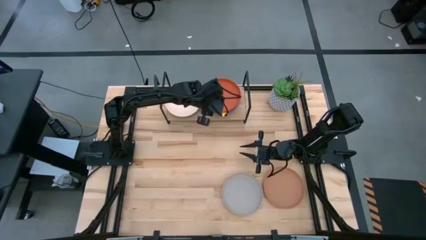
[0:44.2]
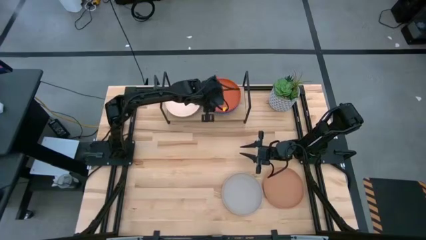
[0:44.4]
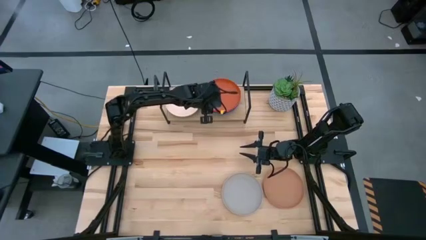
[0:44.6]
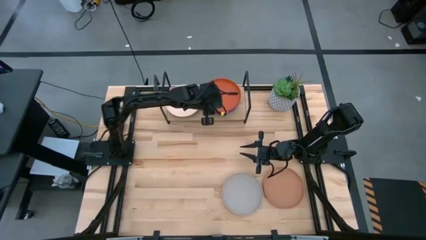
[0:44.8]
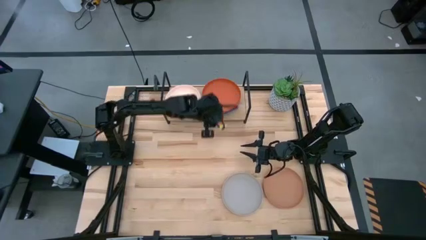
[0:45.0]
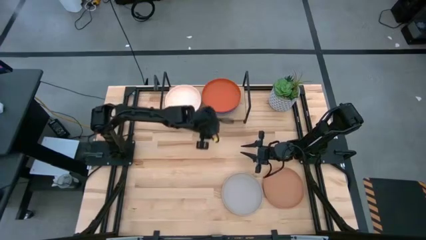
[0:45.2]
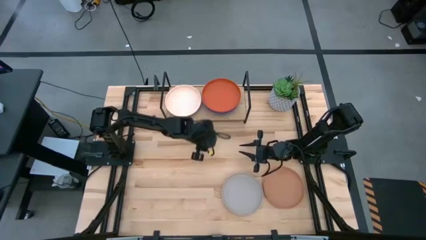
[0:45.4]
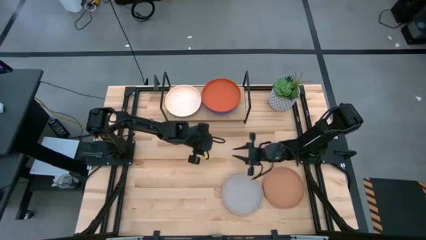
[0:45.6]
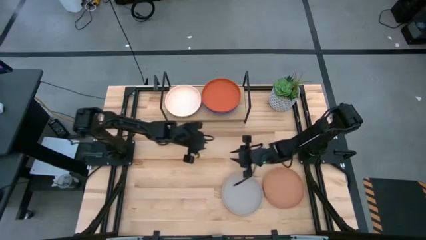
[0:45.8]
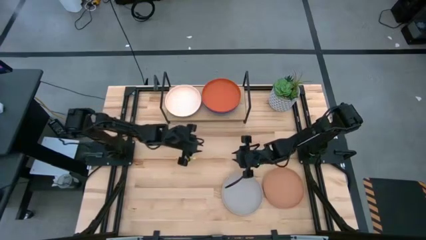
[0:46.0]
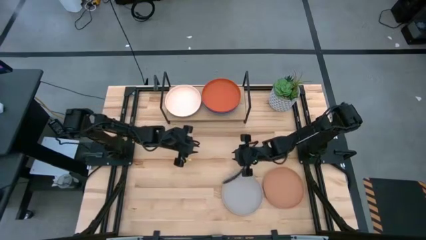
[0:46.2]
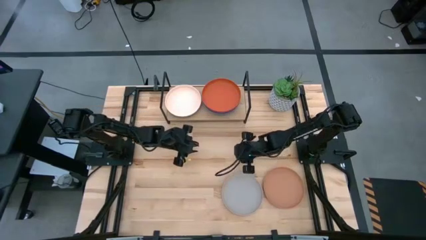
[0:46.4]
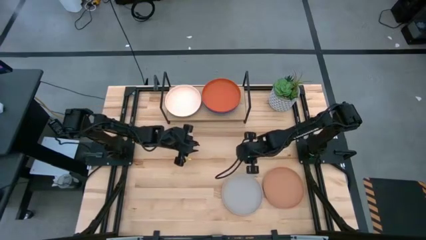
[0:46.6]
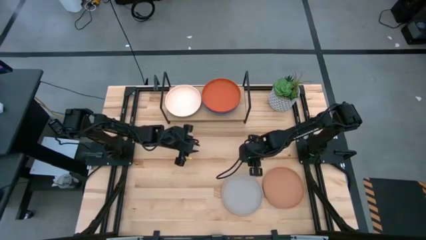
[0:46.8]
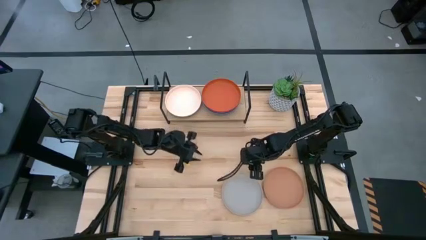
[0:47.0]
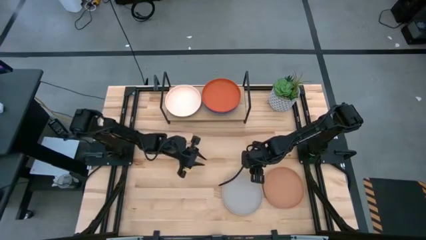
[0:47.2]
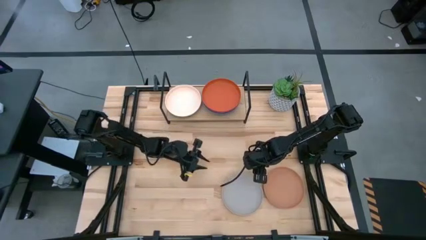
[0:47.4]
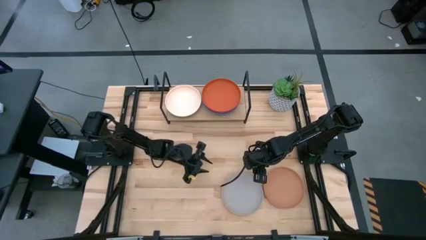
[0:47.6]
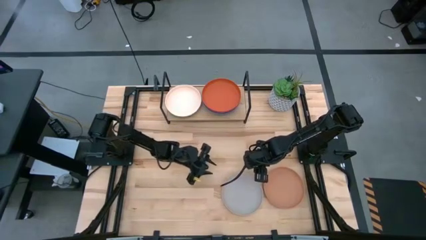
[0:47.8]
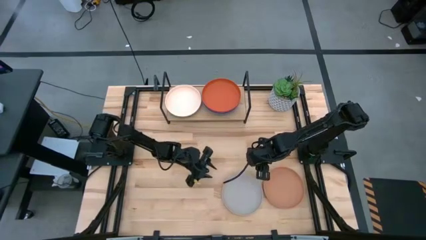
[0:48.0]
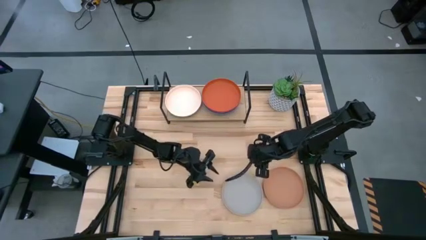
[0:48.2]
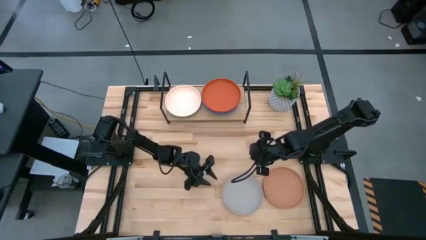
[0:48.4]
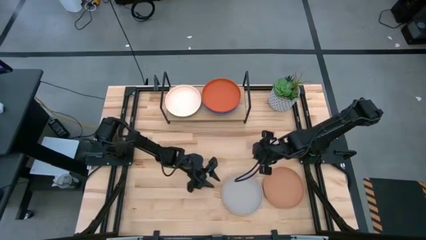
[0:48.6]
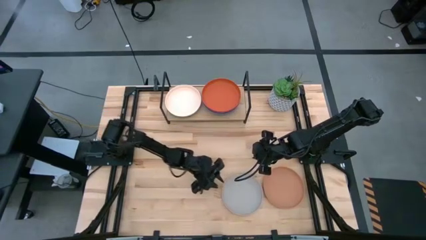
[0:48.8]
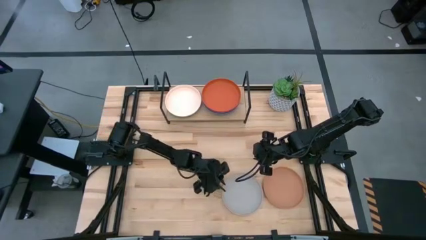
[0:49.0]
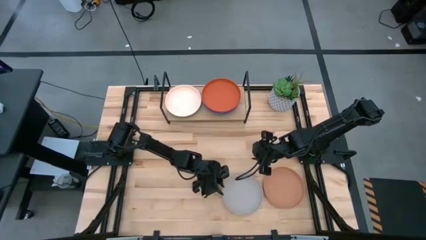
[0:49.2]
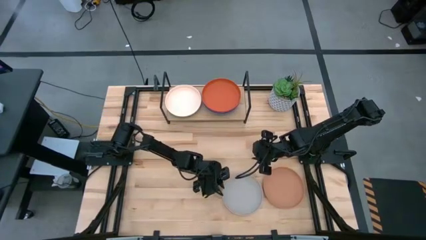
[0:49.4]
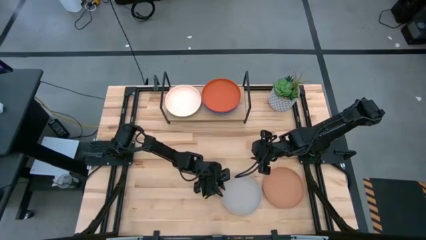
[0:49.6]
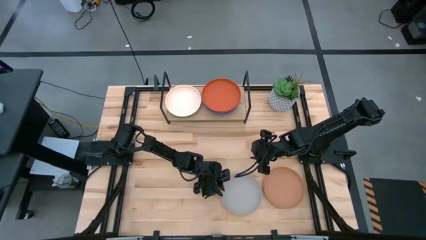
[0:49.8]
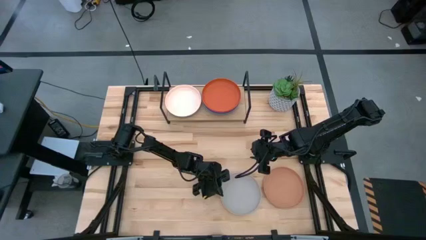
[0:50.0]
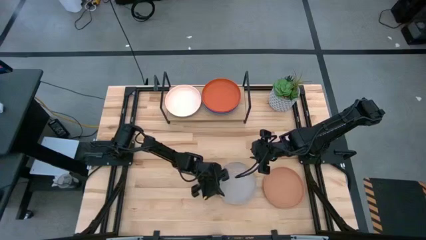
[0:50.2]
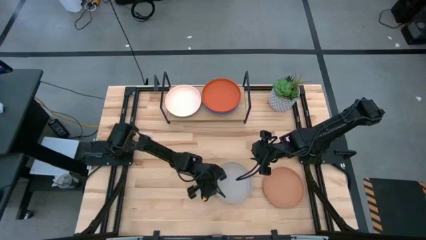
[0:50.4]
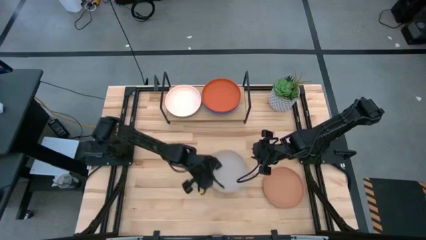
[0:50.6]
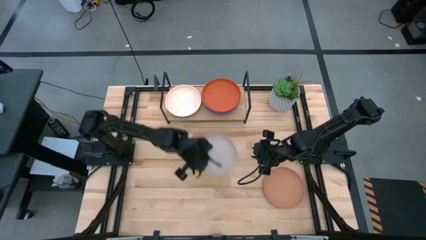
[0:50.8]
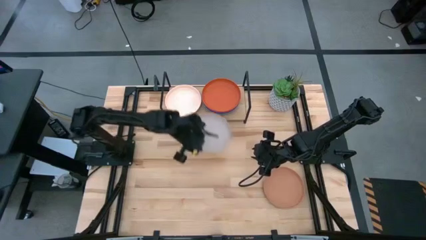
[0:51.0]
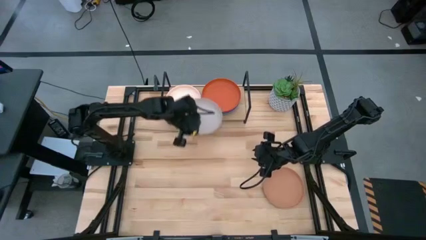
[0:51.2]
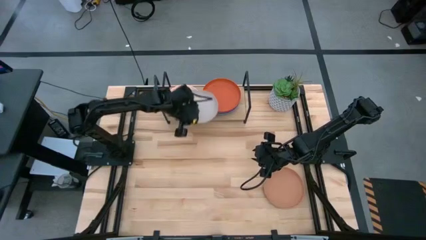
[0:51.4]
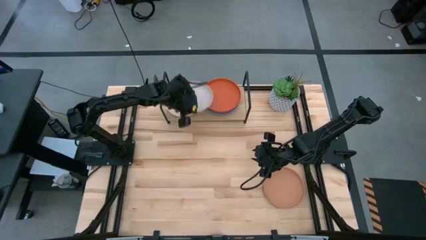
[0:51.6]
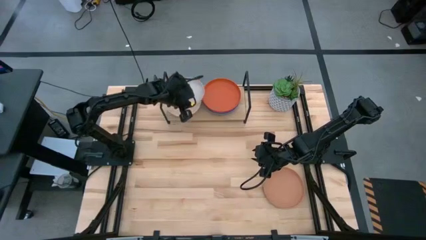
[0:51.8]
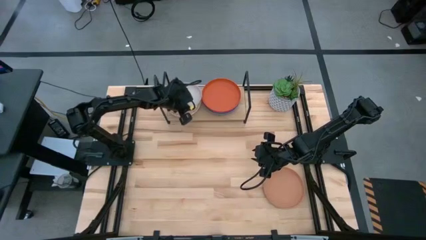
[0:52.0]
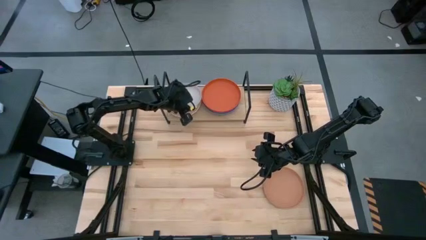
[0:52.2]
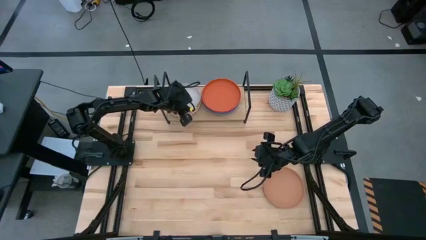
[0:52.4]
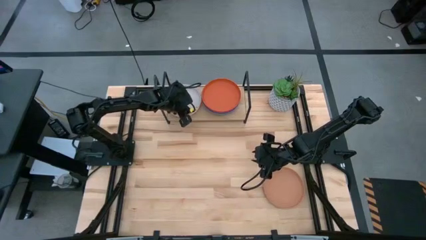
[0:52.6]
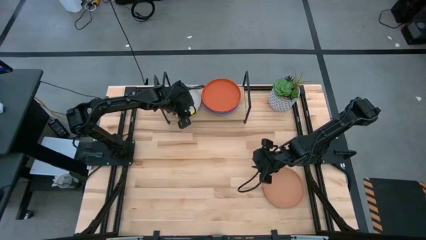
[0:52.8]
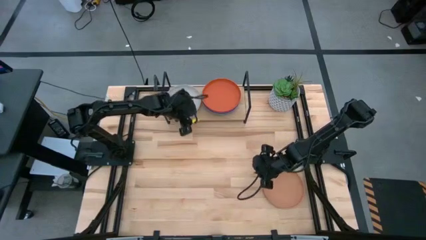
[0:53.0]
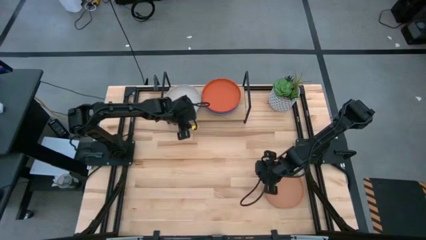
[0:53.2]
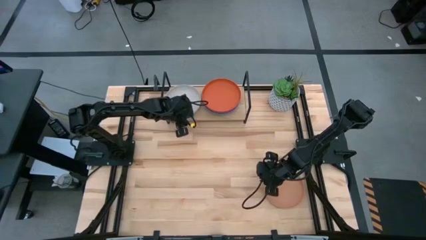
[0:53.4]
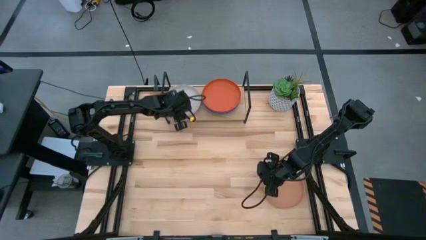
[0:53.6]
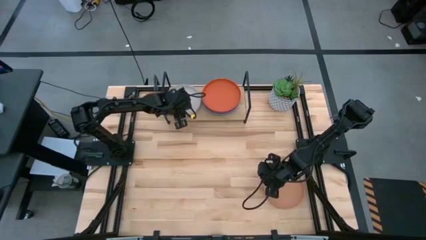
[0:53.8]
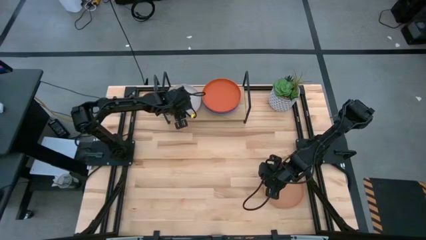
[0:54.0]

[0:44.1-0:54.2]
Task: Place and stack plates onto a shelf
Stack the gray plate on top of the peach plate on the shelf

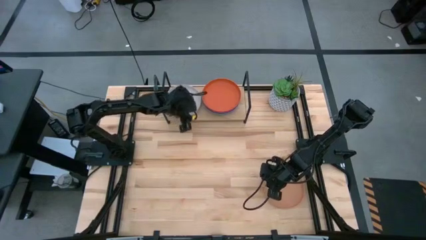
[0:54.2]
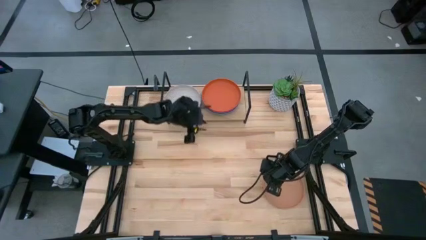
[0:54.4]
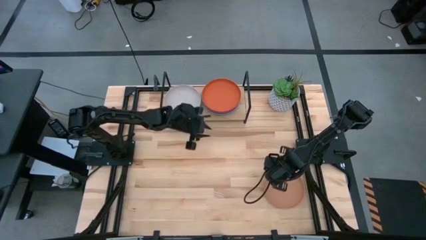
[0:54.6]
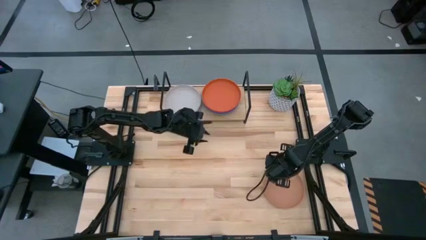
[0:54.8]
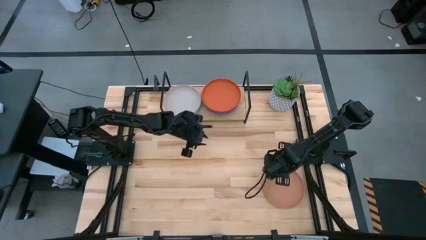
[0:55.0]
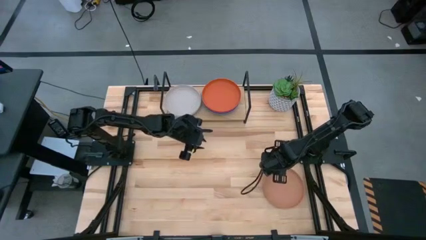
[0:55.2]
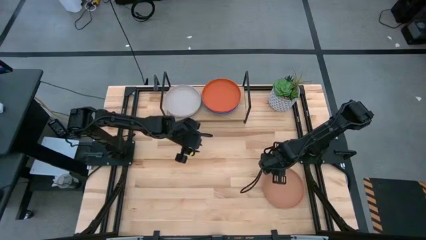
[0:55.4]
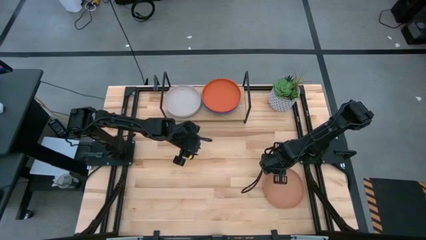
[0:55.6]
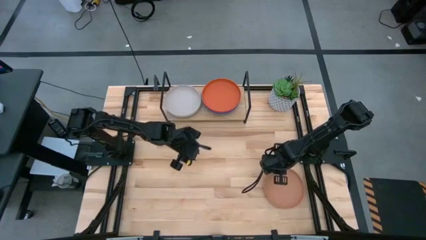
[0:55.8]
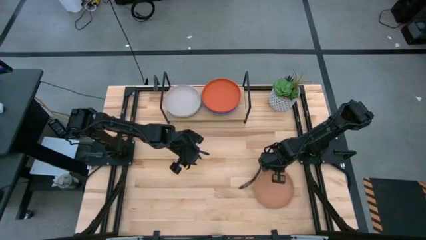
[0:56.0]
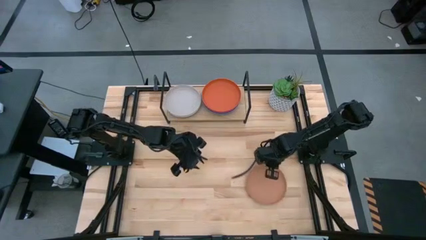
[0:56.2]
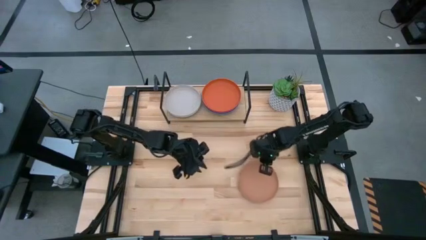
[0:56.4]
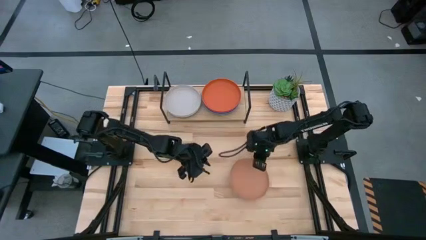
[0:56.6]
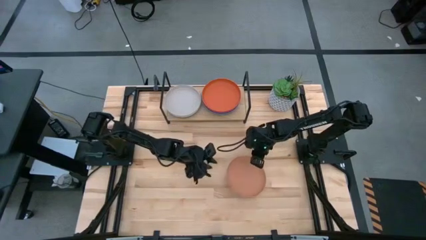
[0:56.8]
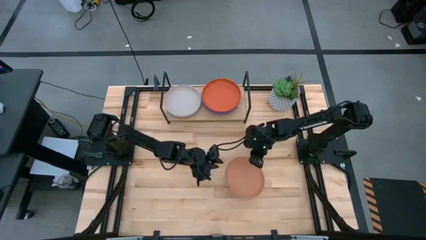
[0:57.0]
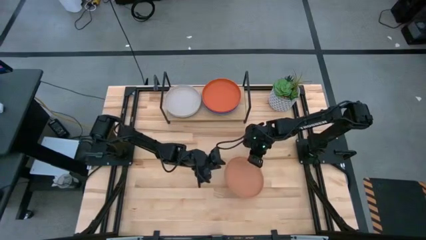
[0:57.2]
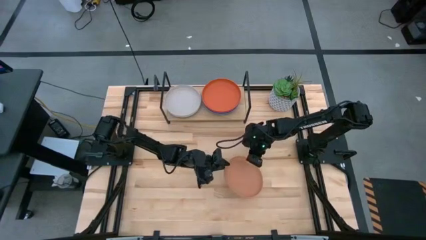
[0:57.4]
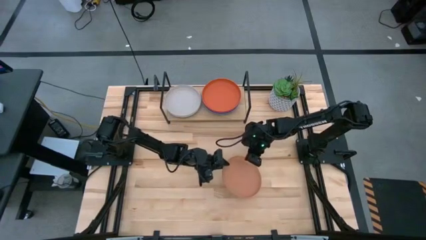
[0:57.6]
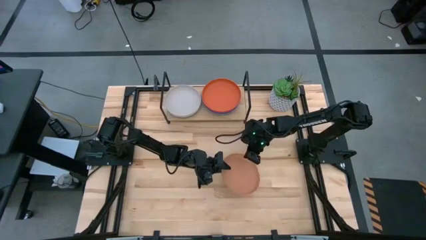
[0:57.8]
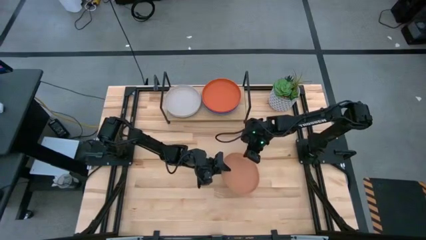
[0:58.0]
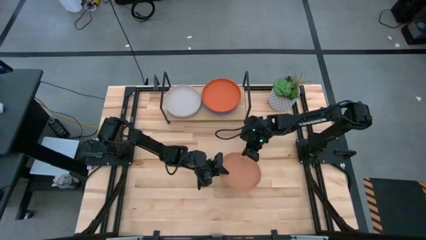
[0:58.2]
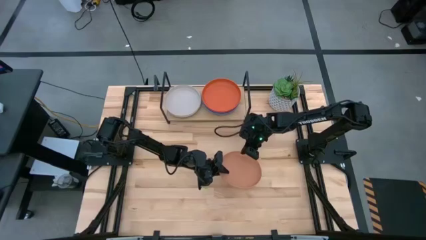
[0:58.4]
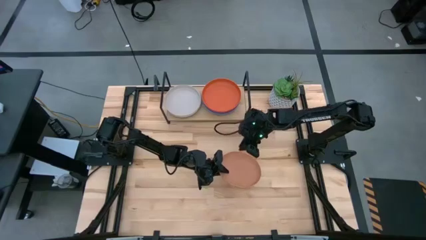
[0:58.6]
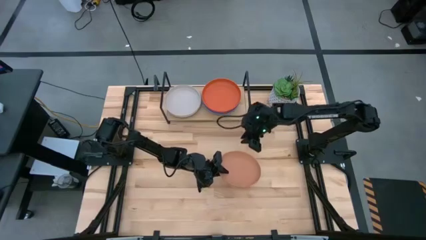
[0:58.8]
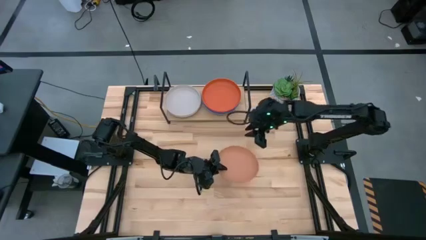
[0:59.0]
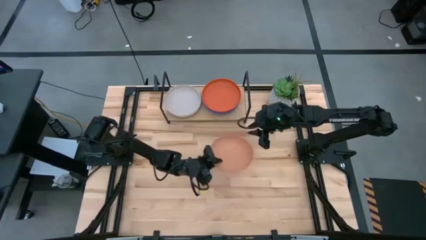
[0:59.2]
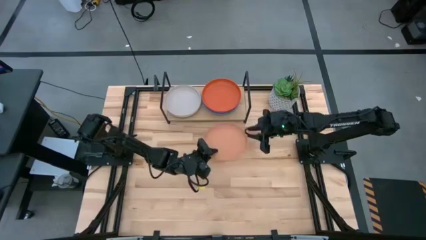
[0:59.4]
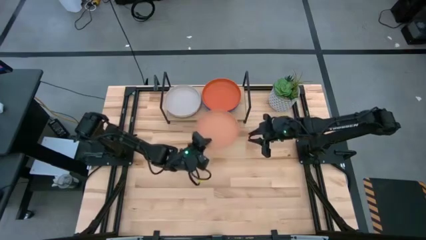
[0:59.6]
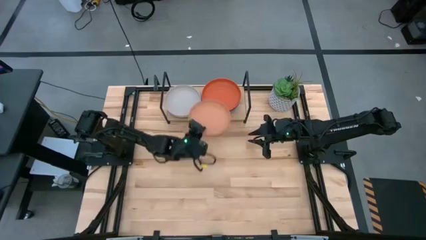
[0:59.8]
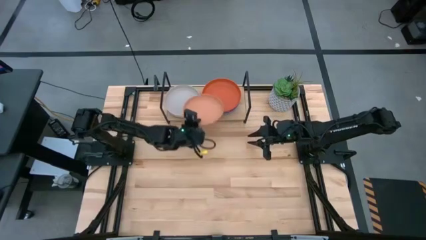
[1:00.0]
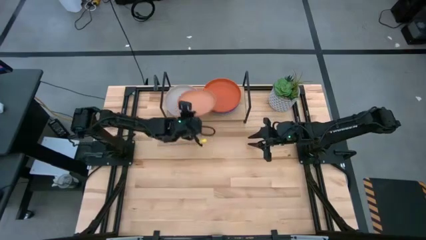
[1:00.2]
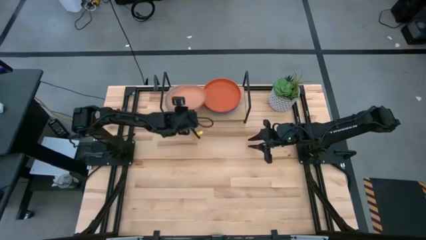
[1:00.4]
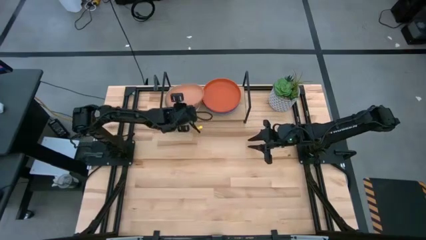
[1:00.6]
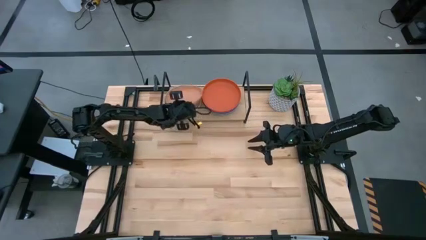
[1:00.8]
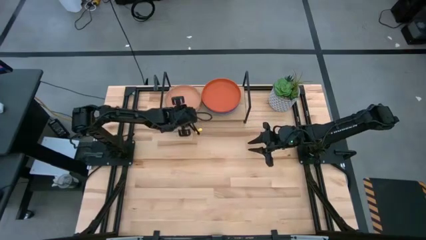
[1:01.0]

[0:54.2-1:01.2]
Stack the brown plate into the gray plate on the shelf
